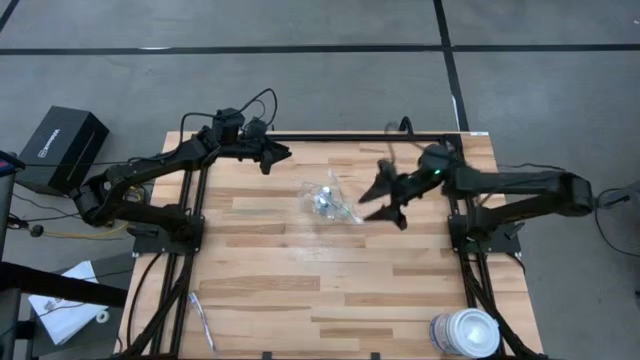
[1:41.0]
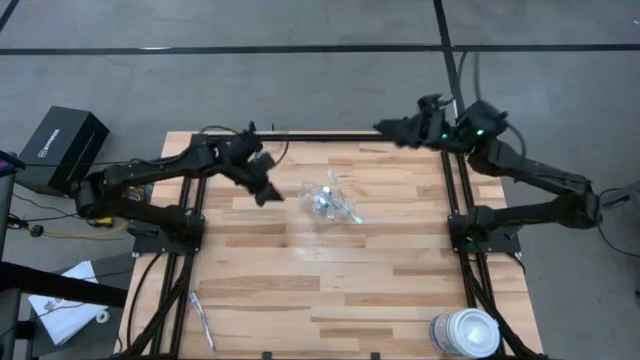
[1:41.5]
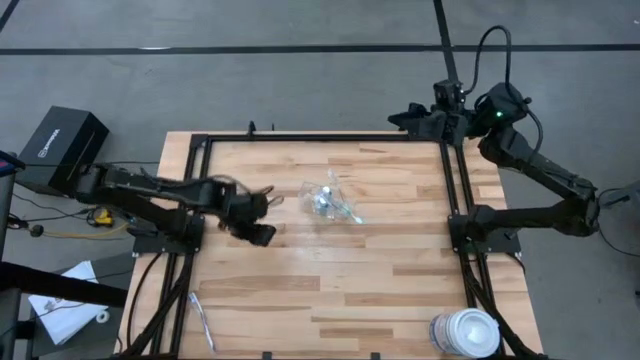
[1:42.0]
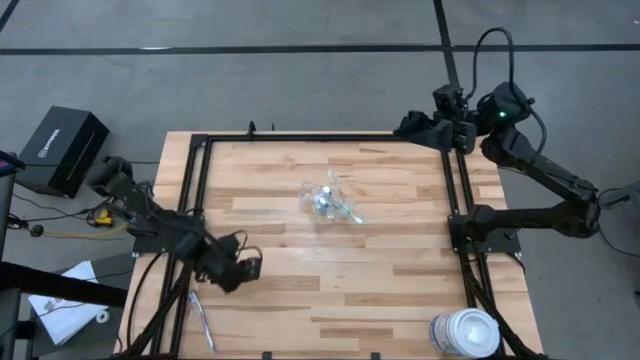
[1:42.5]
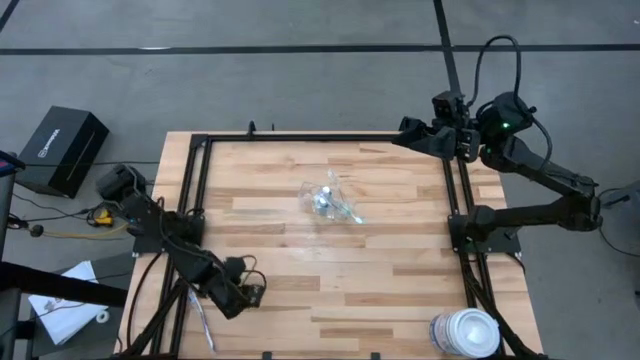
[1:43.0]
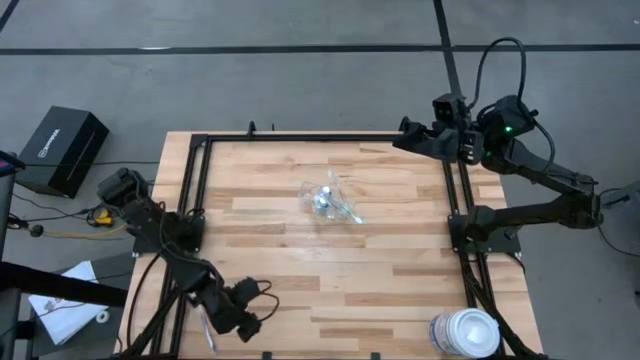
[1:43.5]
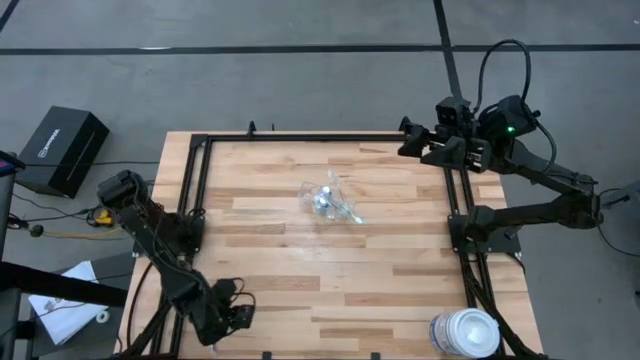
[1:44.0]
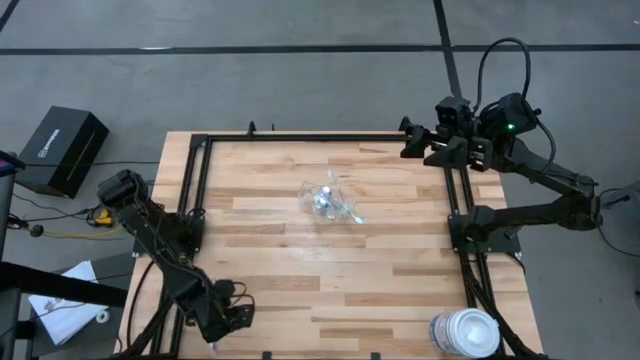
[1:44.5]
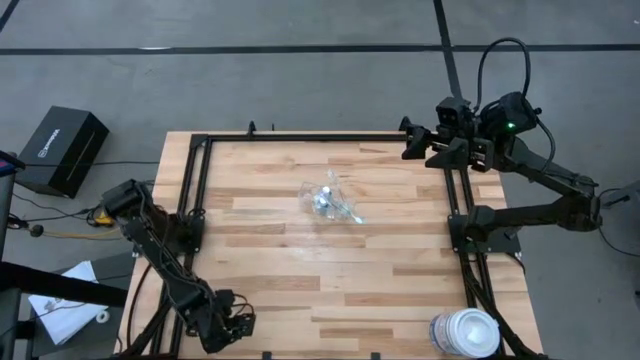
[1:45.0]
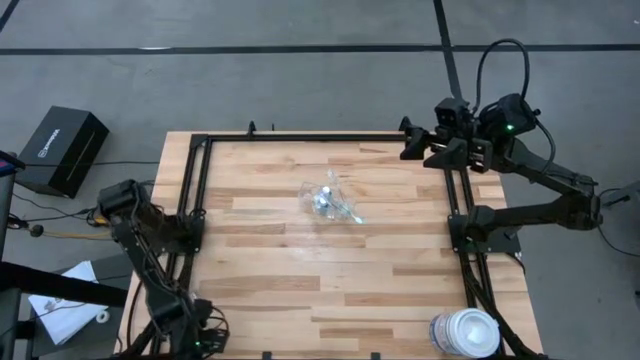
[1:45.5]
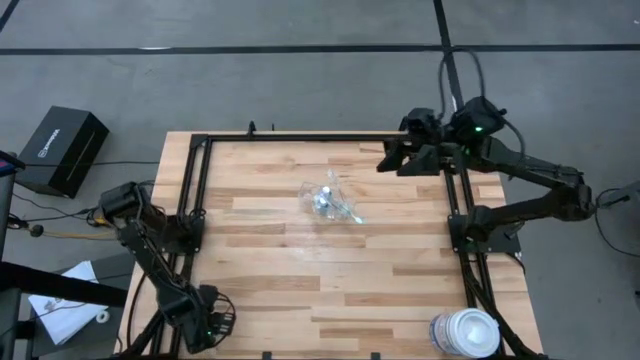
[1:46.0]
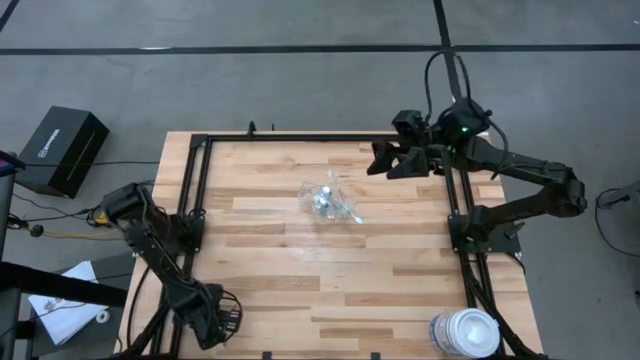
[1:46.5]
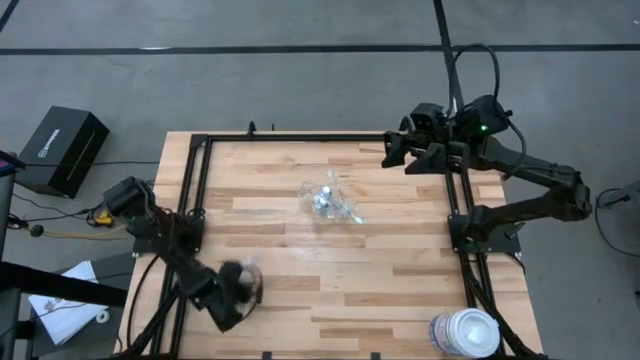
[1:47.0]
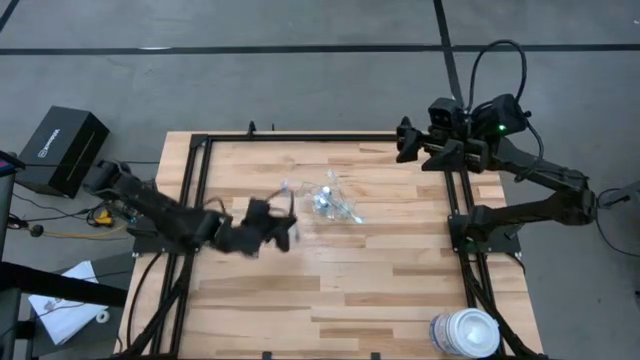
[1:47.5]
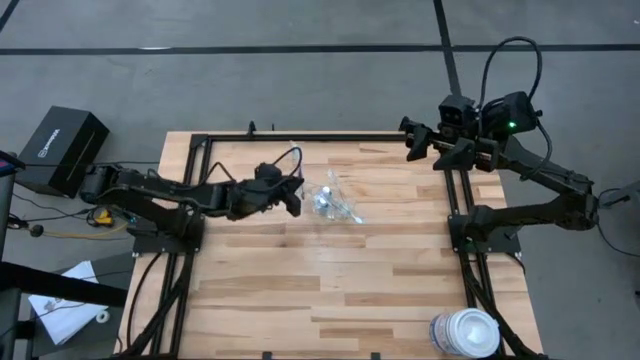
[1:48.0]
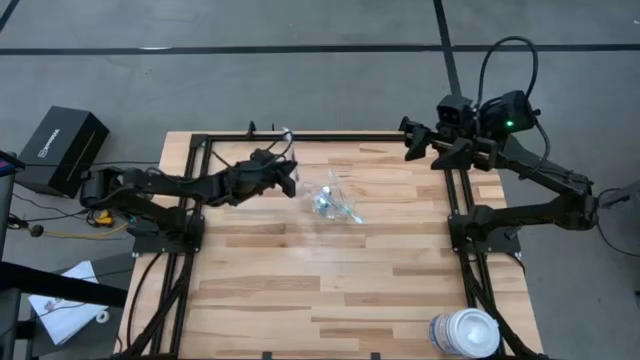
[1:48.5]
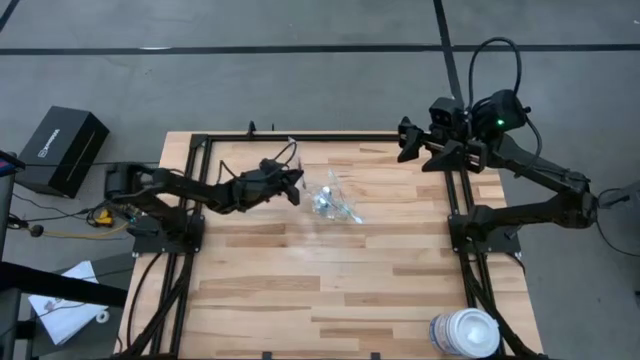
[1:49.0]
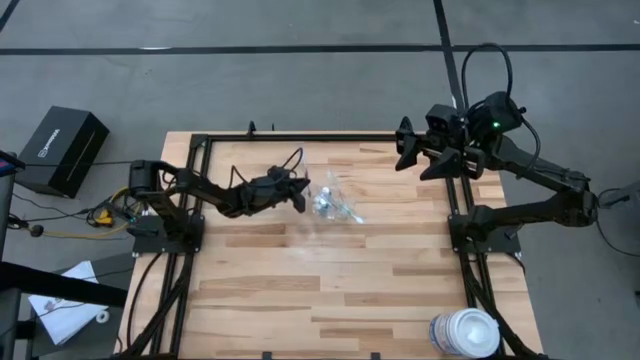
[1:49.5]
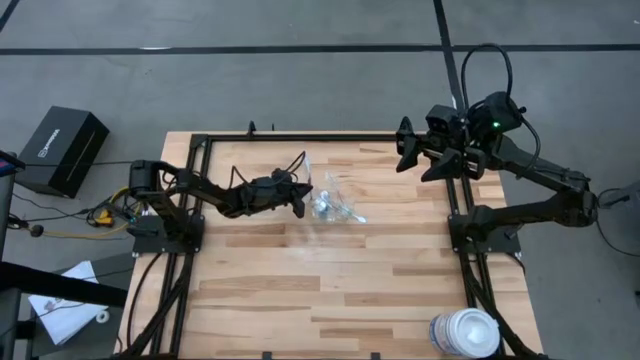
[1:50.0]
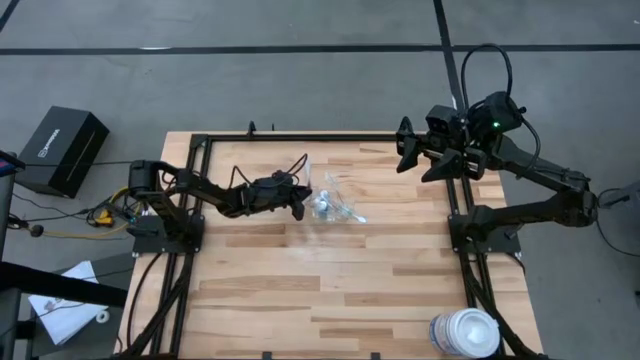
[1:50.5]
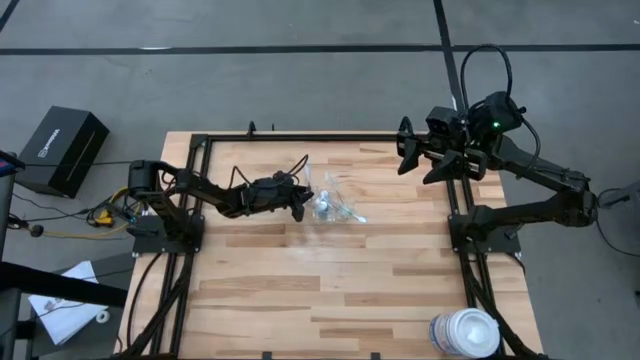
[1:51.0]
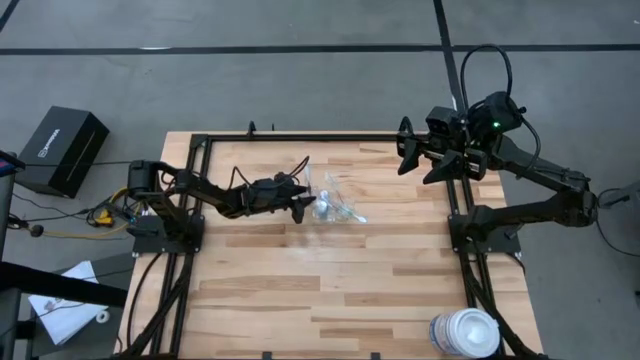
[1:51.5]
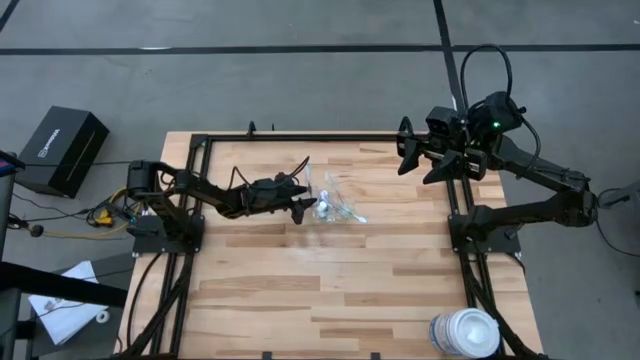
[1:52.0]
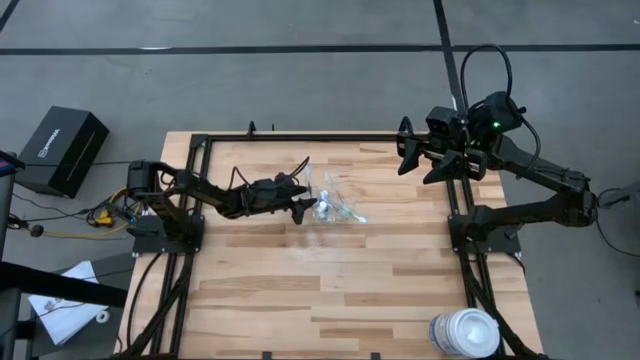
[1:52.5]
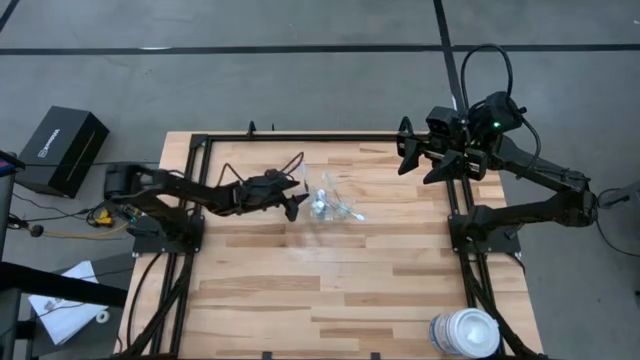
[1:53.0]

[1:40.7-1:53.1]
Task: Pick & Place toothbrushing station
Put the purple toothbrush into the transparent organizer

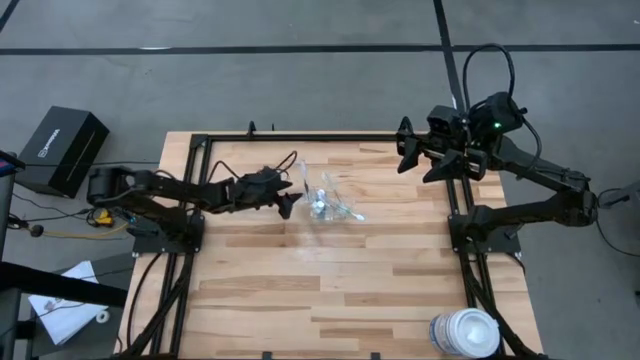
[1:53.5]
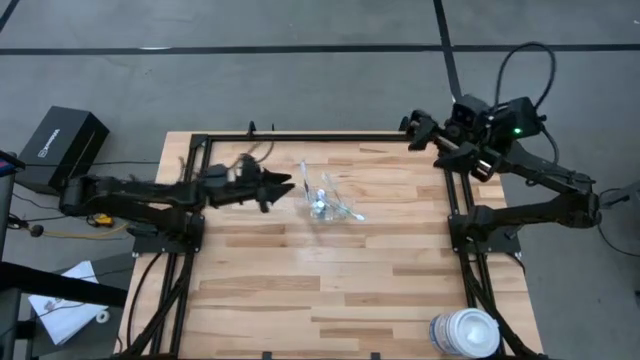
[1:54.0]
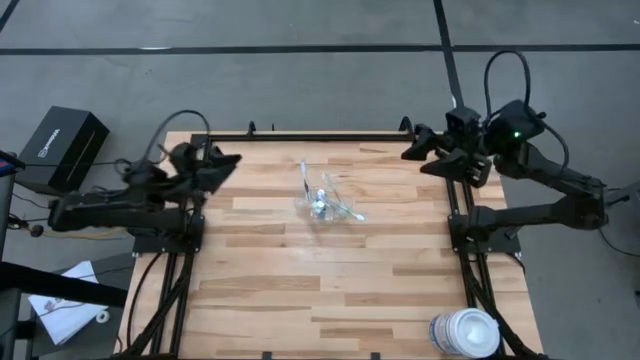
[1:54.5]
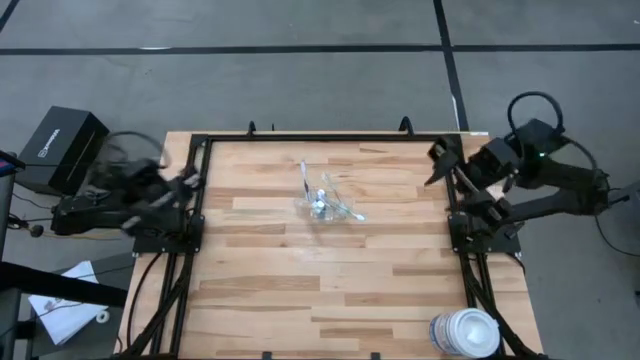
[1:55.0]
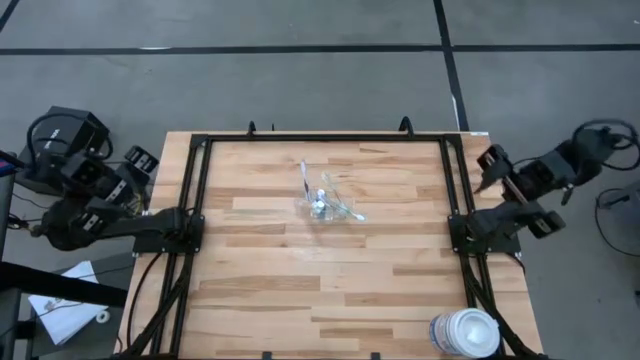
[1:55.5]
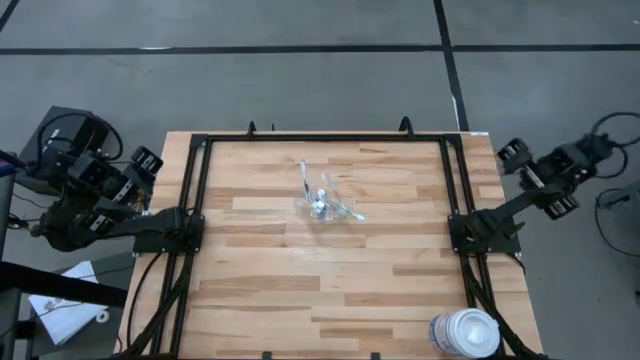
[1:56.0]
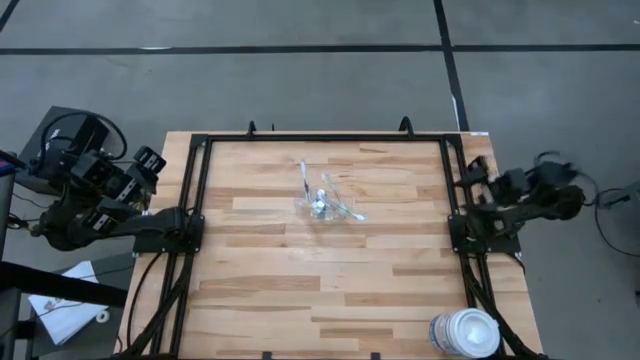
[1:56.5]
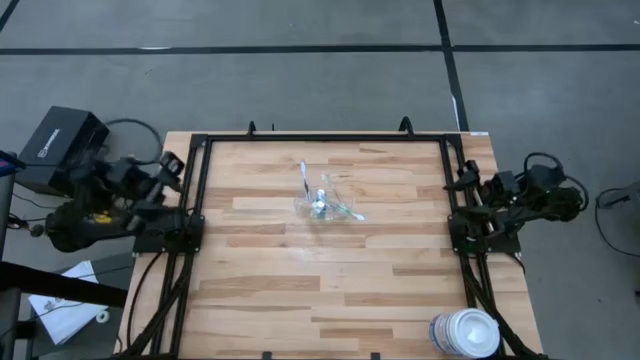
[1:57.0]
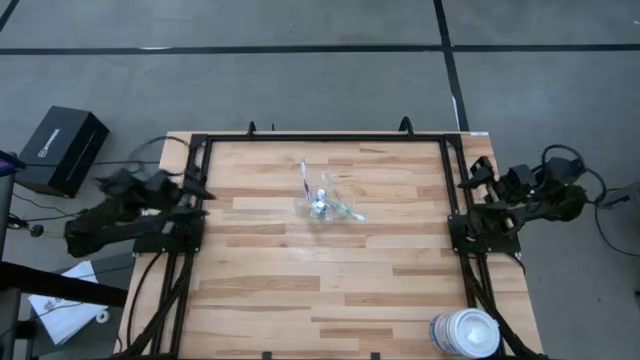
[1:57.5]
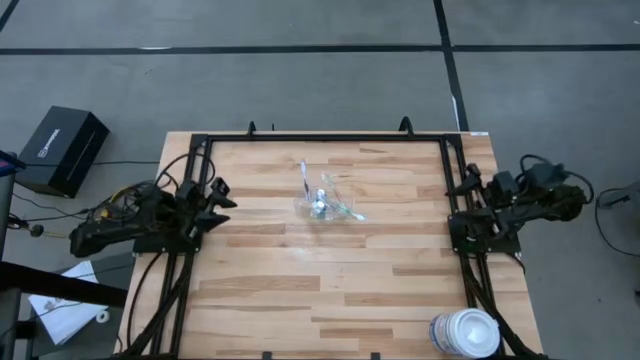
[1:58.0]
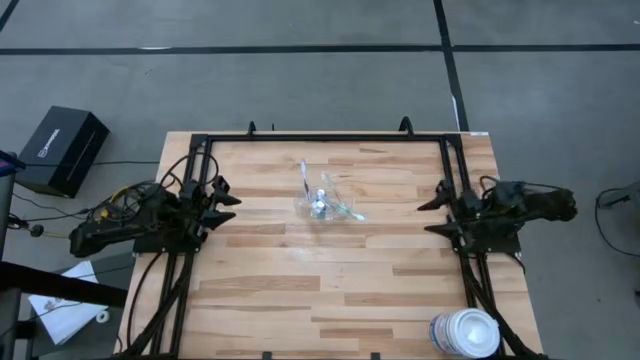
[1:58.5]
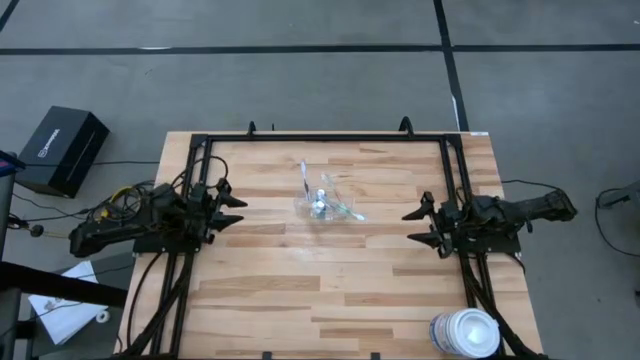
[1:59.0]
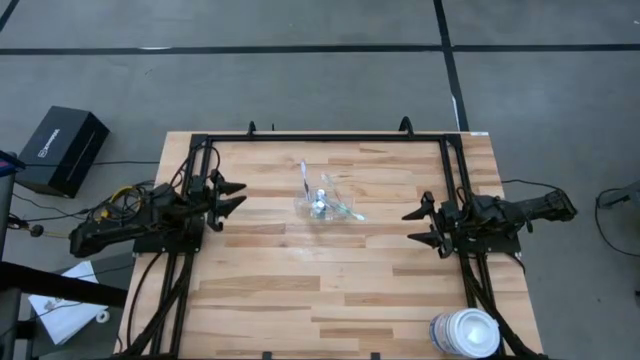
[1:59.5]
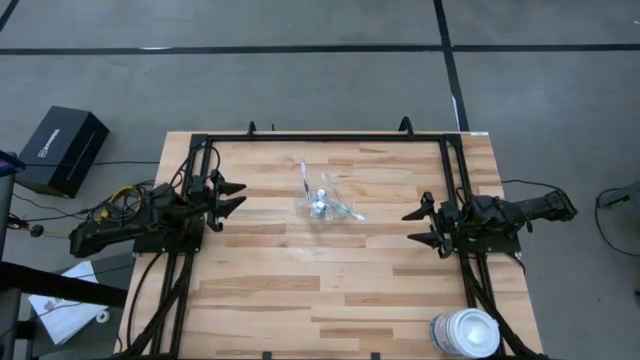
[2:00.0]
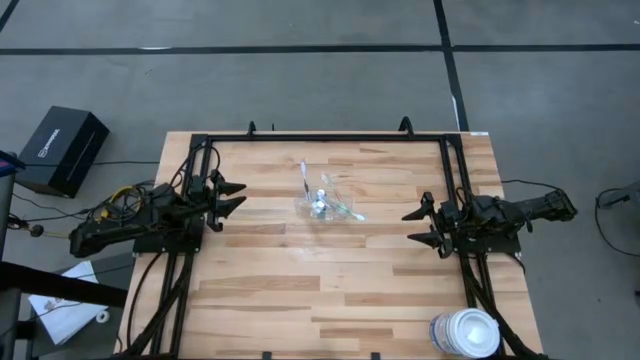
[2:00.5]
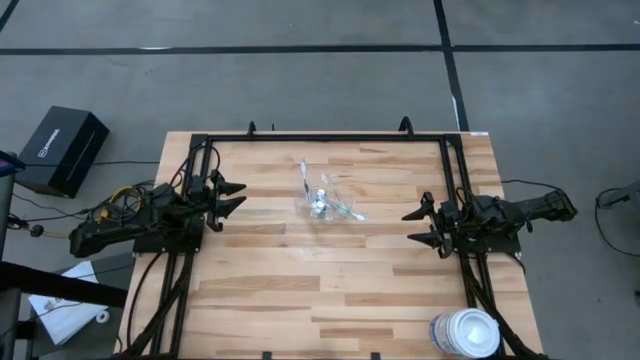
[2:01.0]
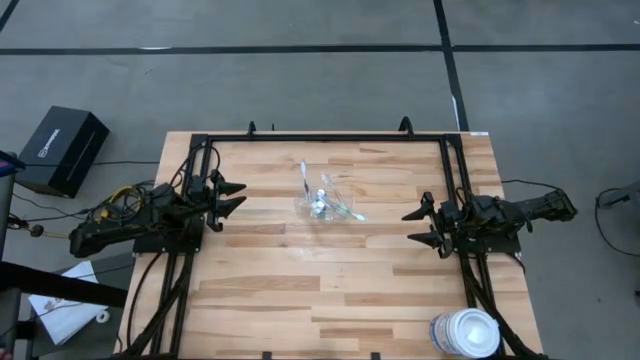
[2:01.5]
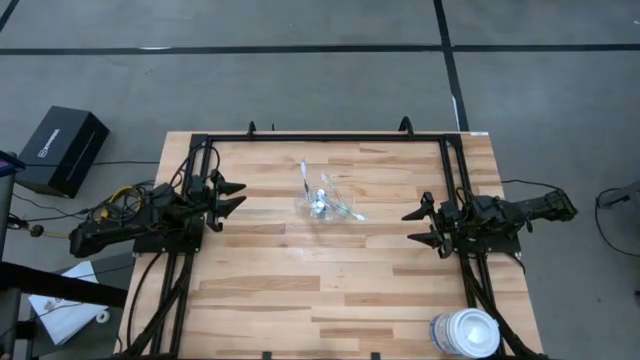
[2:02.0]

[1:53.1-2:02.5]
Return to Home Position
